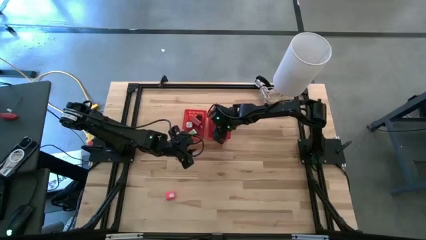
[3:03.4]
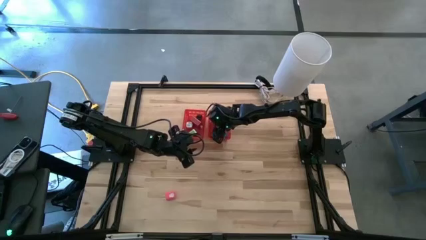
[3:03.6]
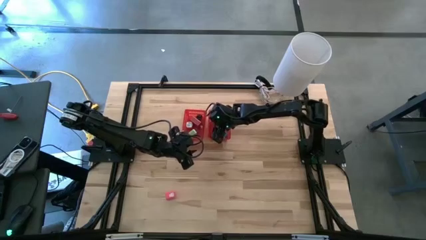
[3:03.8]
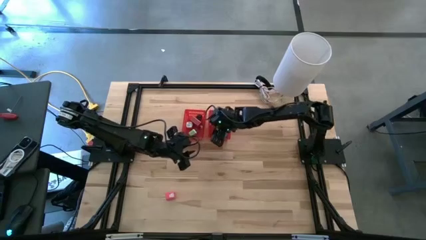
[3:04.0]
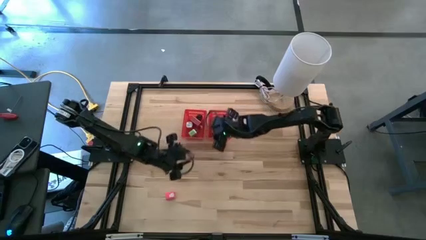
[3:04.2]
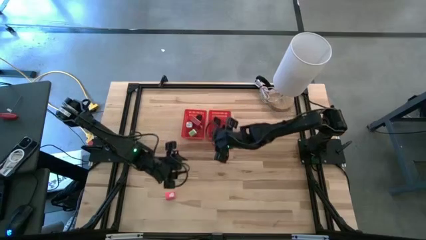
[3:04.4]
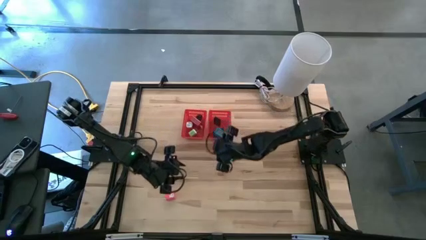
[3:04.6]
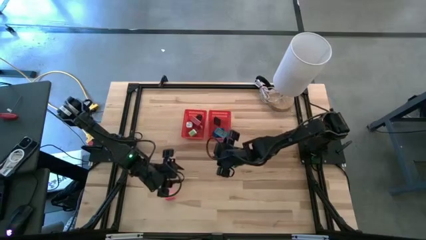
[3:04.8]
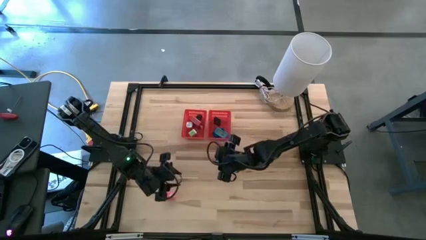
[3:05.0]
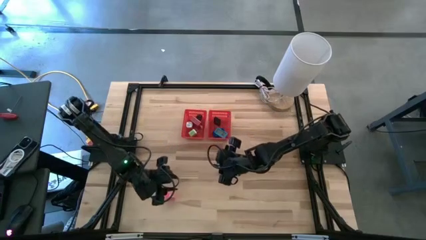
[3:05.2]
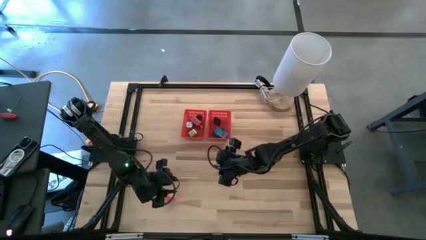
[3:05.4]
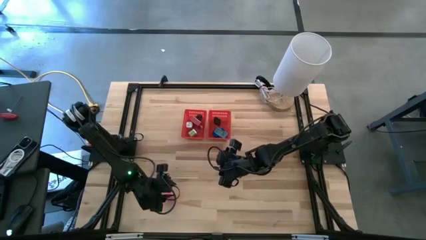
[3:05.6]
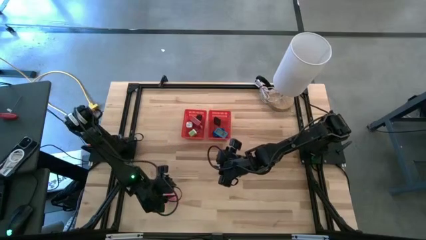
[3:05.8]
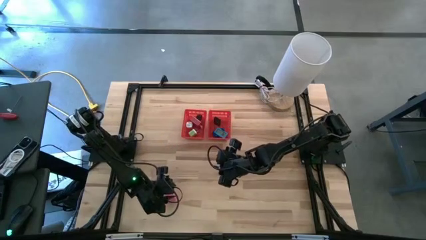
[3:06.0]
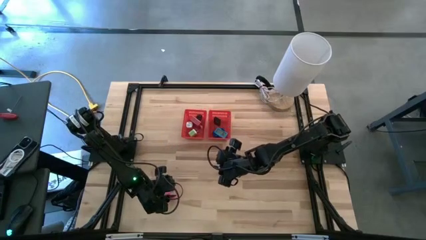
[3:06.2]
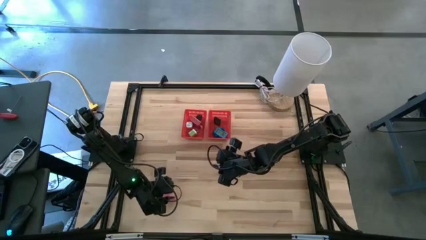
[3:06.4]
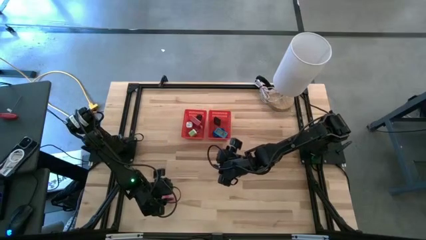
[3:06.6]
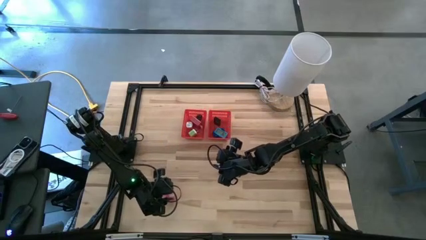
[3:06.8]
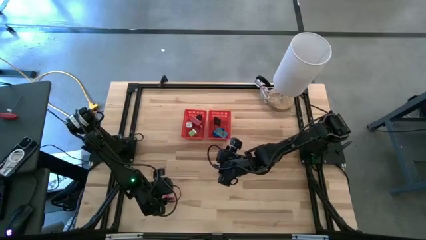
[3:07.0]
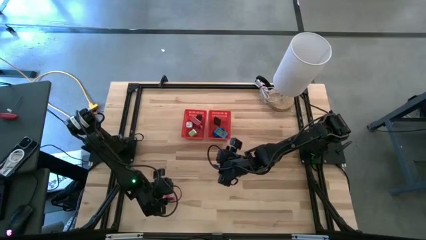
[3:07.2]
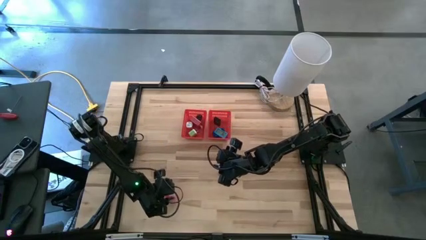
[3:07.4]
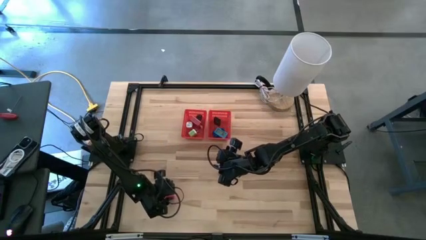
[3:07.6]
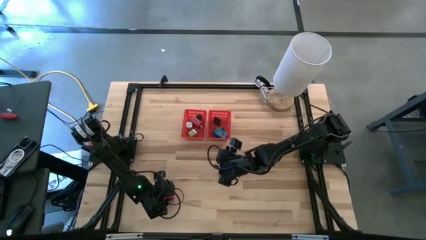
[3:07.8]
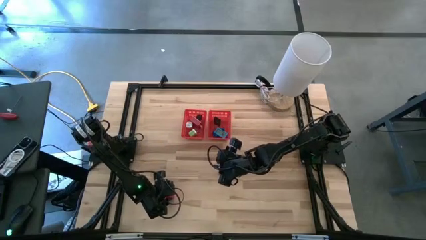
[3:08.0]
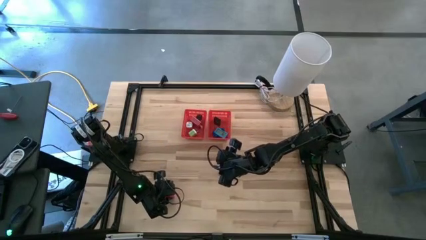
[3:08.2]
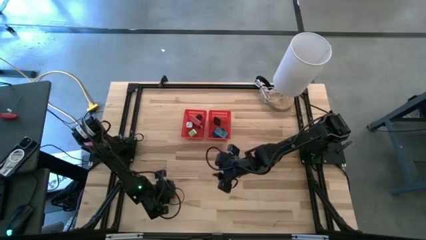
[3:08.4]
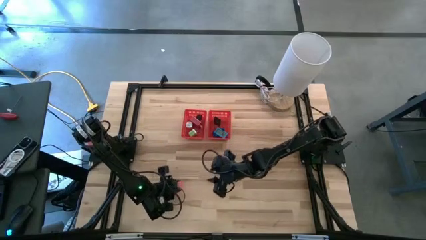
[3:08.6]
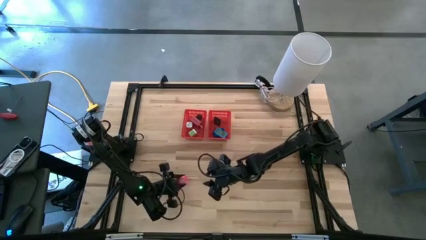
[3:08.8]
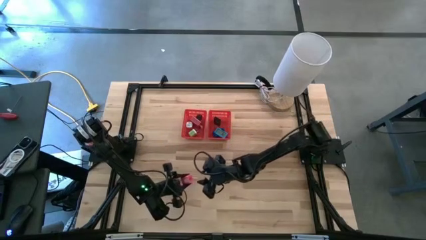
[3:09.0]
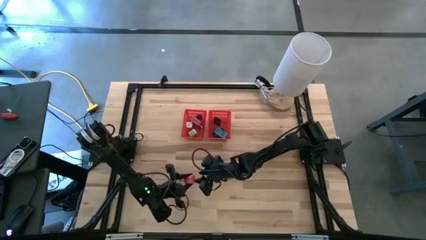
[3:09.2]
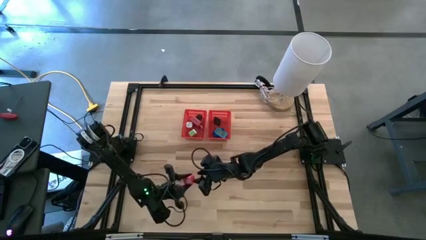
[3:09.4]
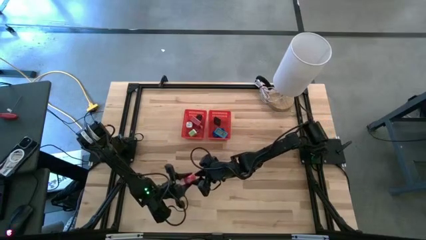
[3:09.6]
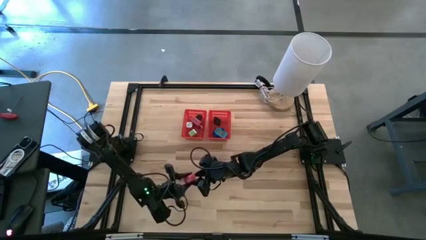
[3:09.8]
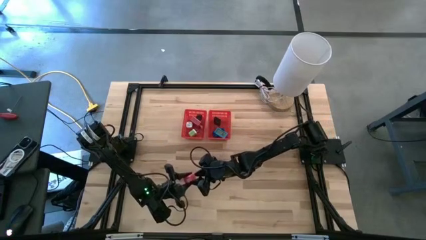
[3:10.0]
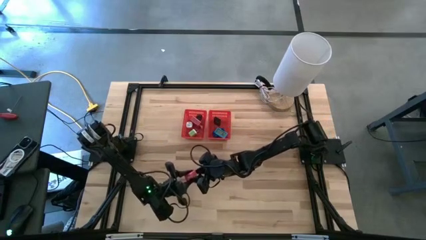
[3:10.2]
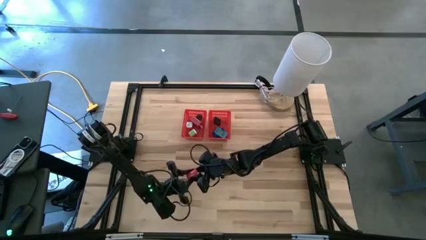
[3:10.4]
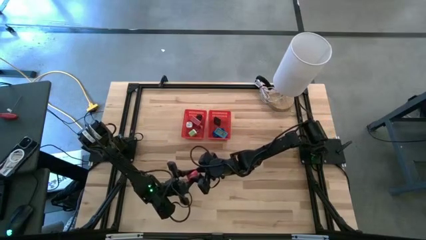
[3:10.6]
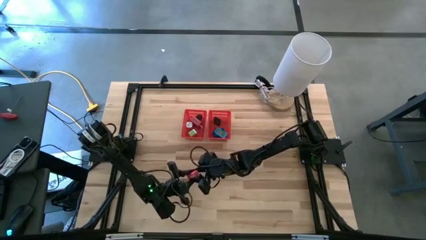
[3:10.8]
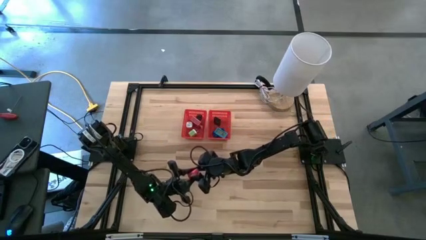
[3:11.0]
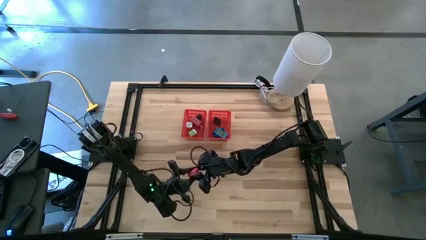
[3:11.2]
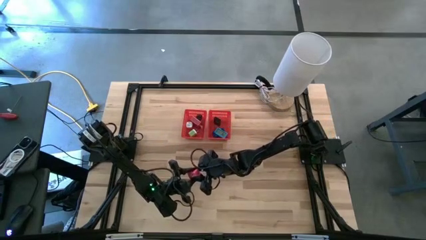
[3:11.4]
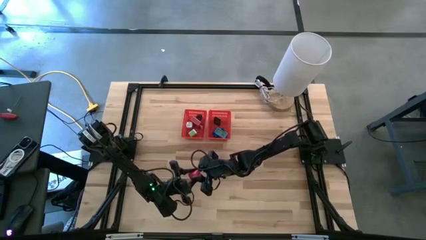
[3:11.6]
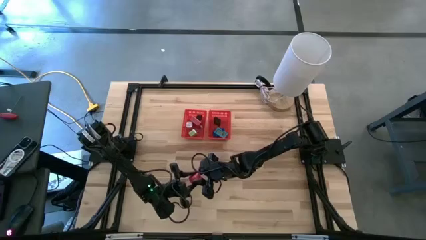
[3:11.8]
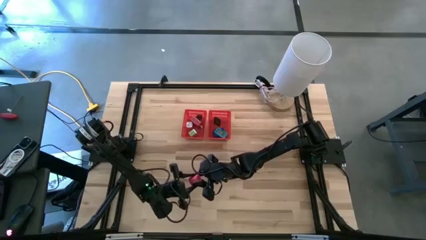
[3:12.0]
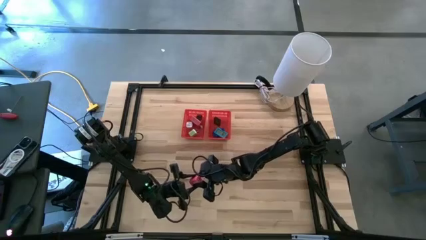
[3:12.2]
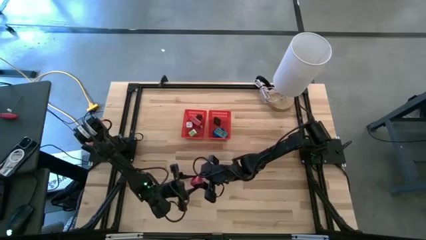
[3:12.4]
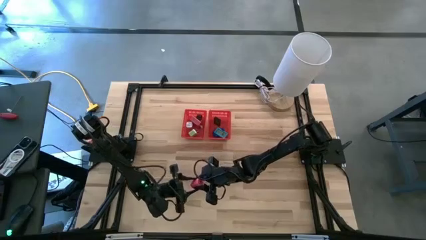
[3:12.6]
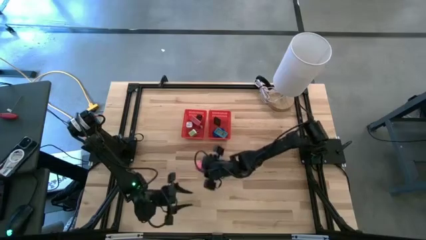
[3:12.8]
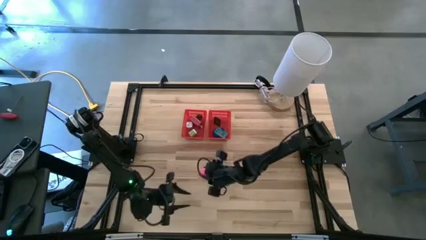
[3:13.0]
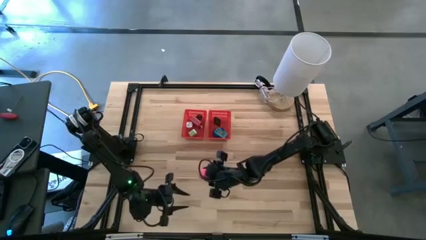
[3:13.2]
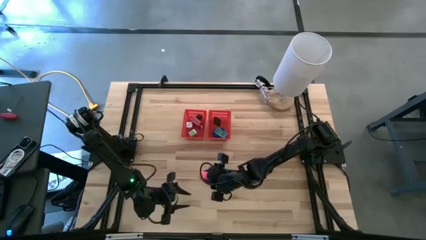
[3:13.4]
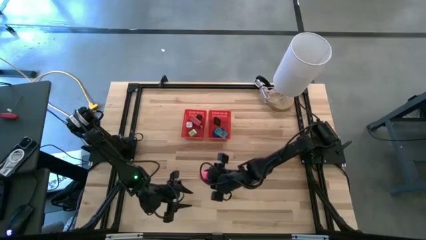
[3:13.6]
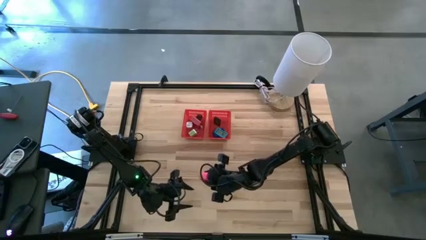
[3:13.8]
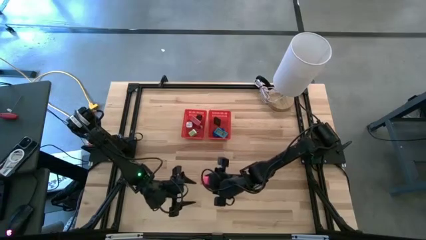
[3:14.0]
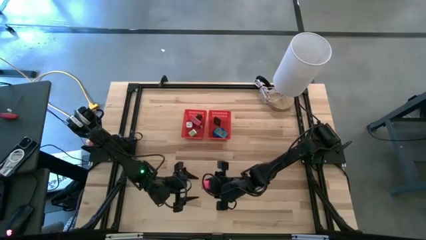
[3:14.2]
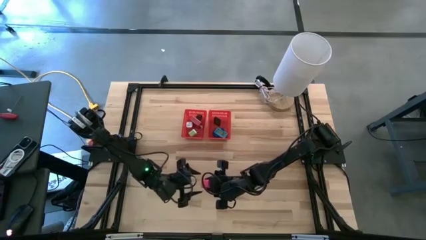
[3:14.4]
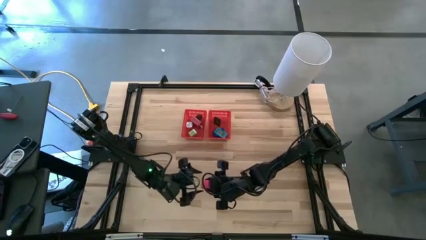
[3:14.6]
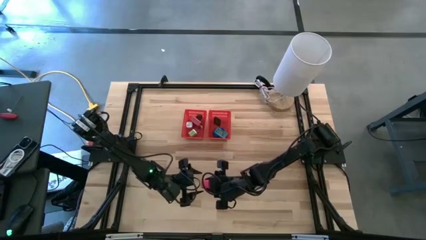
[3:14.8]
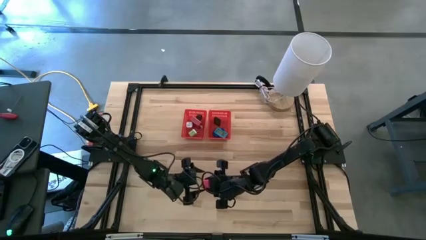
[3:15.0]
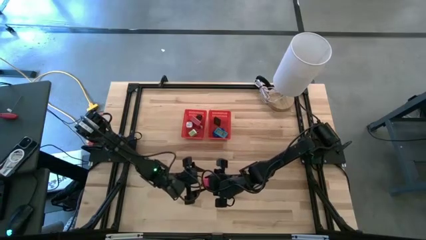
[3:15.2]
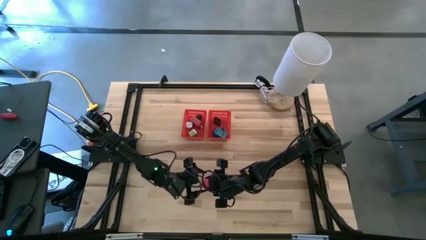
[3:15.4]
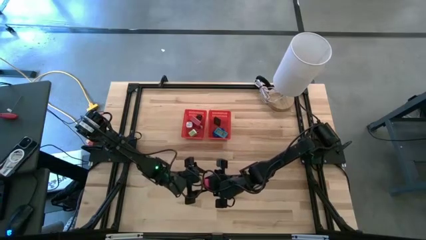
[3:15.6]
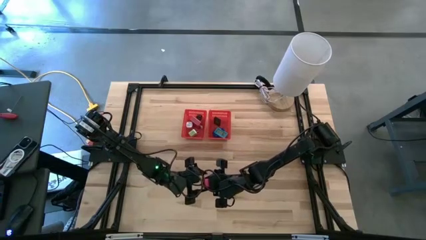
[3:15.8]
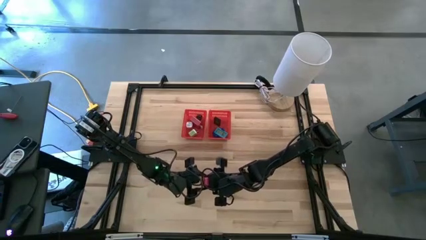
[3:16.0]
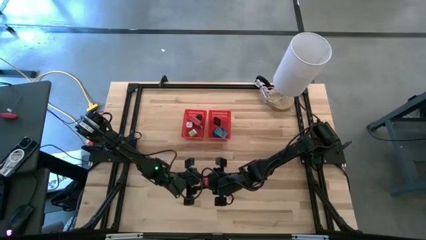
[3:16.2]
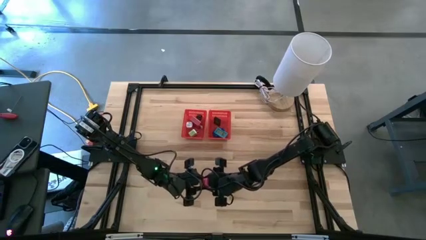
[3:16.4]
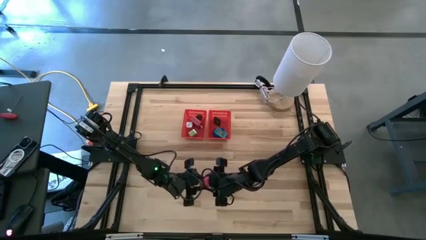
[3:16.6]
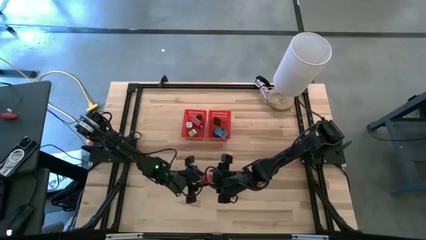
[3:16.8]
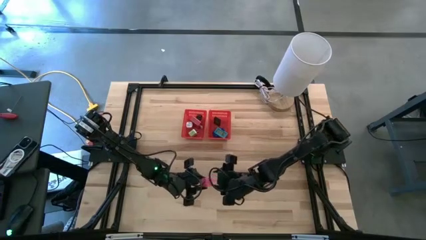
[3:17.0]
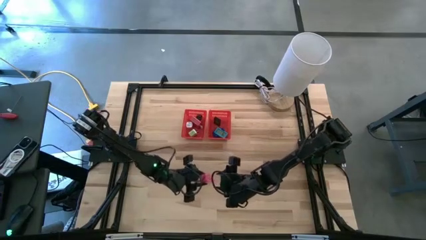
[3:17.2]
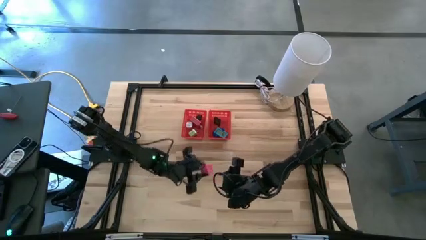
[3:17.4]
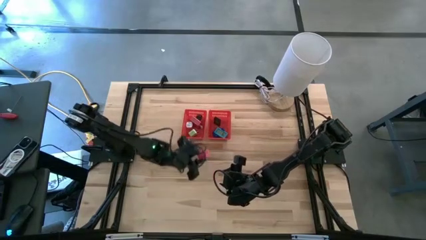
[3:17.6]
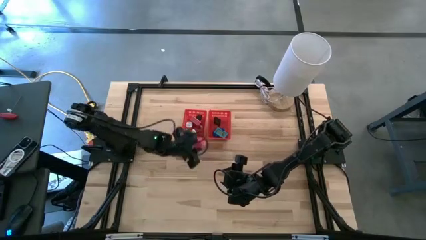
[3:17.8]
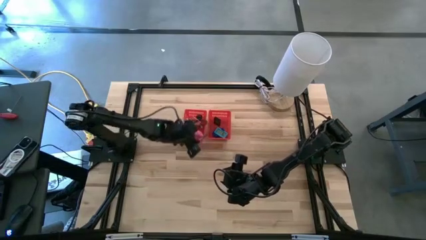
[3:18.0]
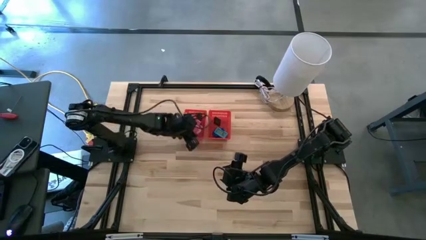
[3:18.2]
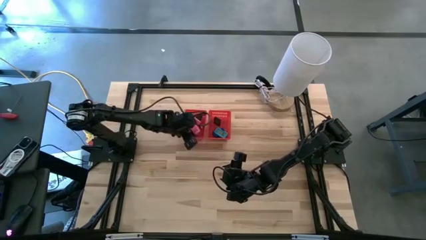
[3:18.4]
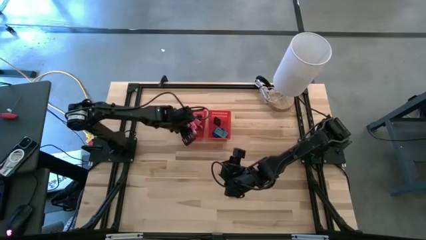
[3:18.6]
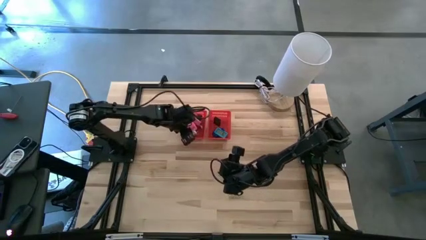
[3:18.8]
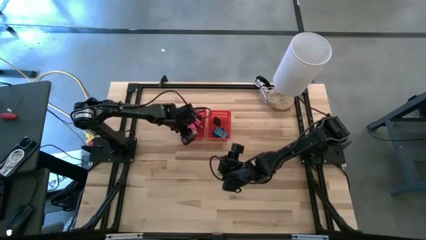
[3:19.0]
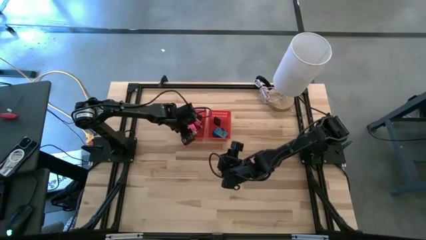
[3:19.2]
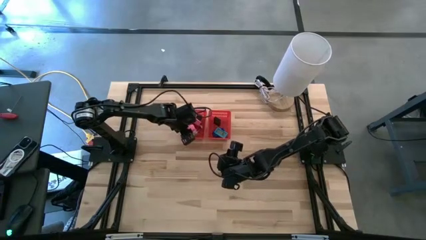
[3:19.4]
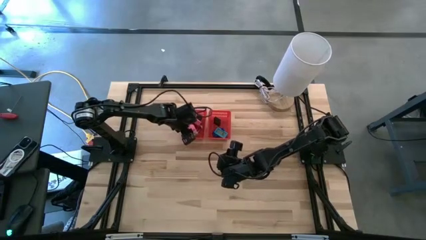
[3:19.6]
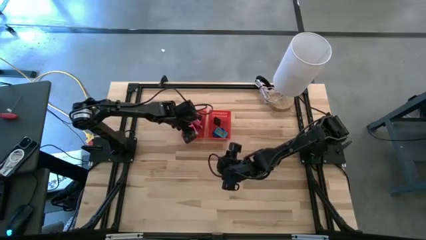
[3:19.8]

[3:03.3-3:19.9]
Task: Pick & Place Office items
Put the pink charger adapter into the left red bin

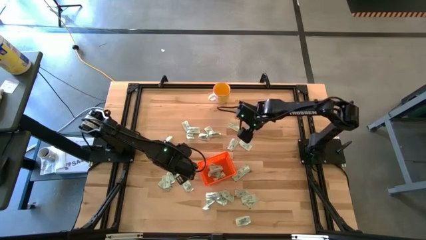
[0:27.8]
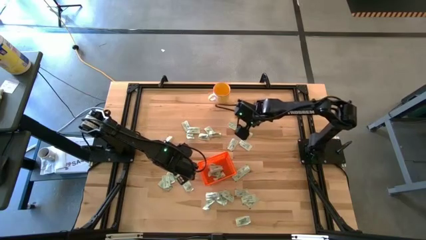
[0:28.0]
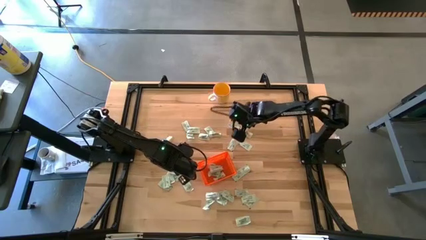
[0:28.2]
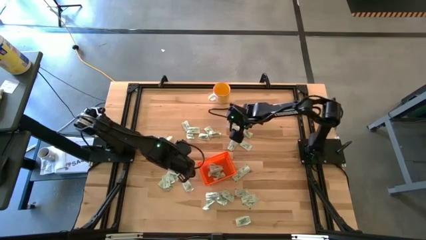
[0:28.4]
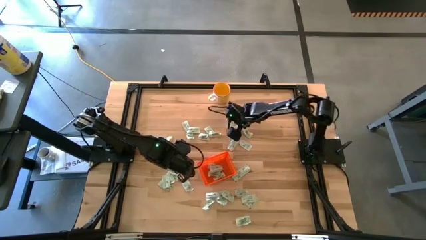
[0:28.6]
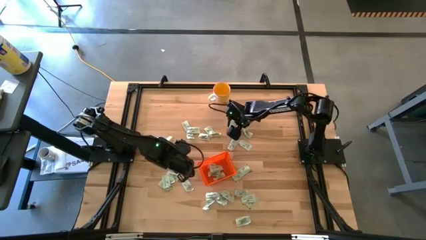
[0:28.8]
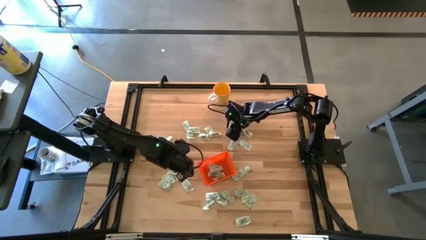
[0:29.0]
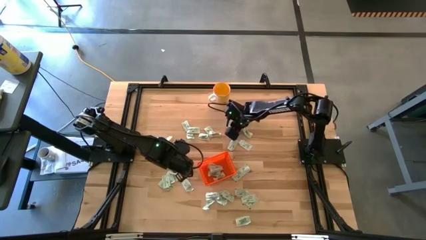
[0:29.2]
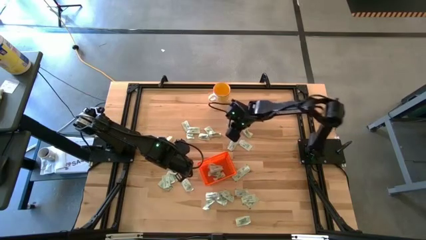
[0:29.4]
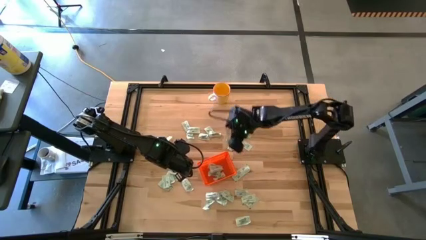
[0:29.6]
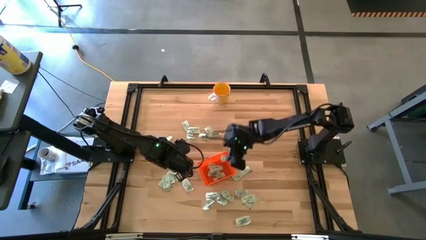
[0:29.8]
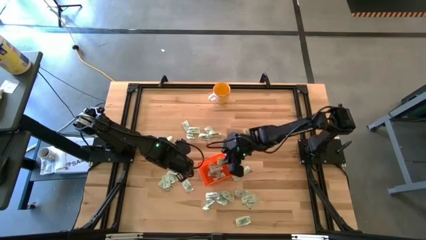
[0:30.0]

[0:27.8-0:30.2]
Task: Pick and place Stevia / Truvia into bins
Put the stevia packet into the bin
